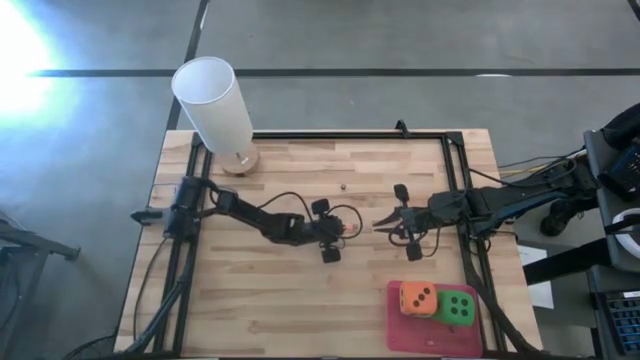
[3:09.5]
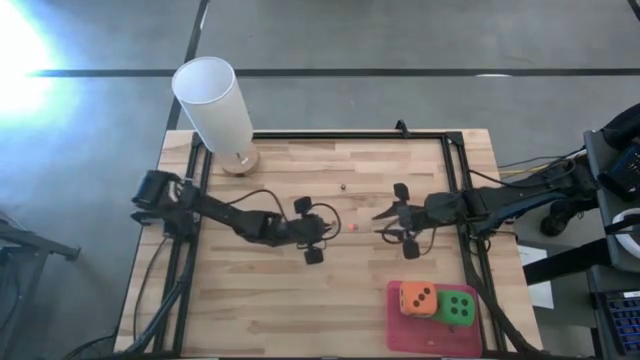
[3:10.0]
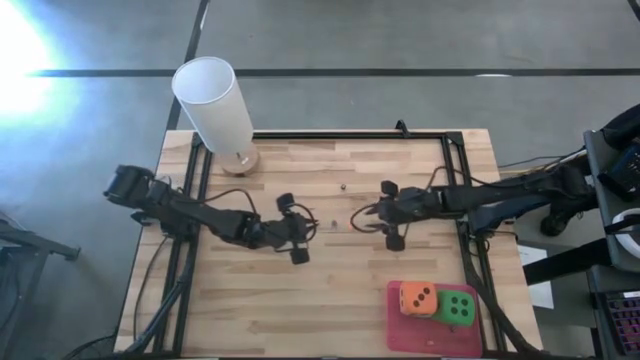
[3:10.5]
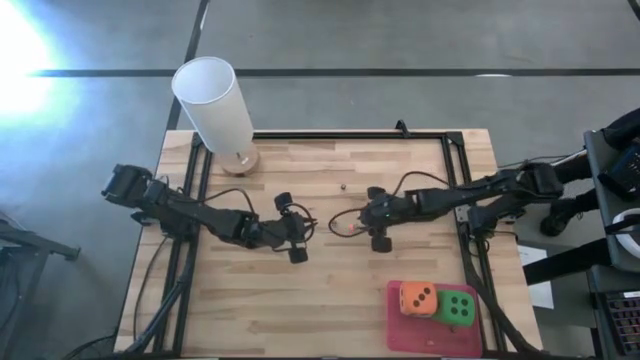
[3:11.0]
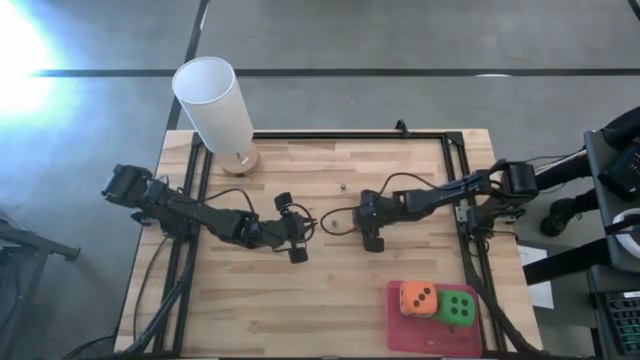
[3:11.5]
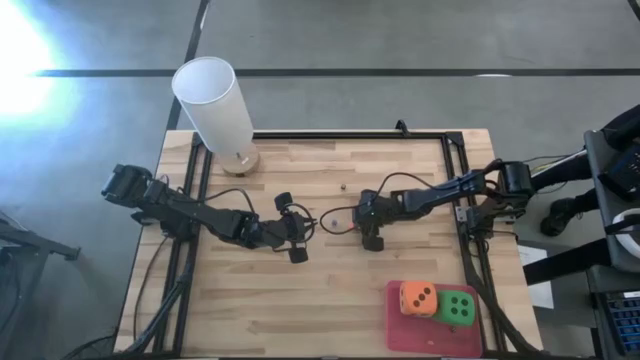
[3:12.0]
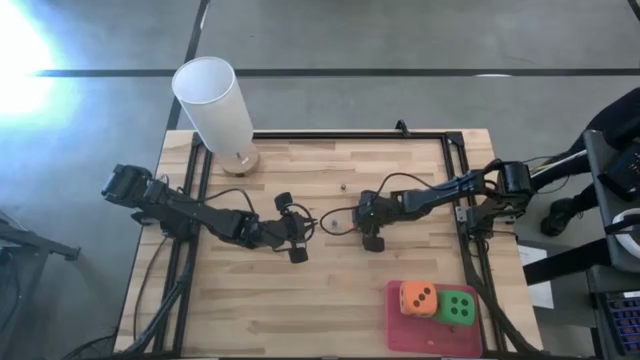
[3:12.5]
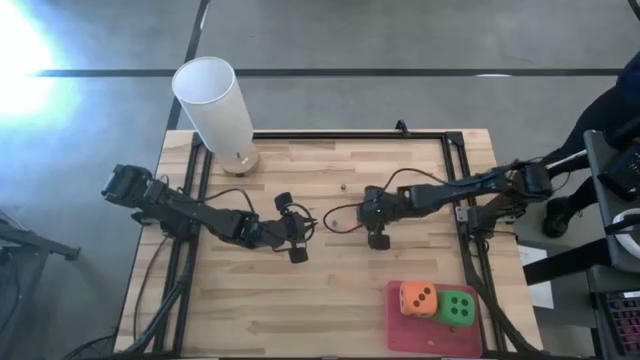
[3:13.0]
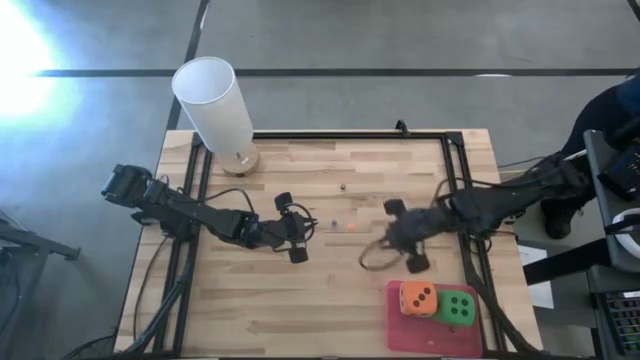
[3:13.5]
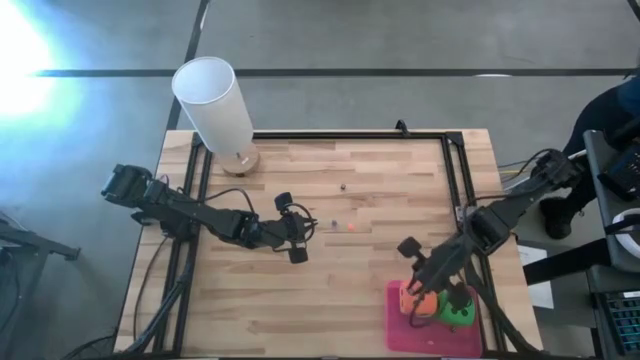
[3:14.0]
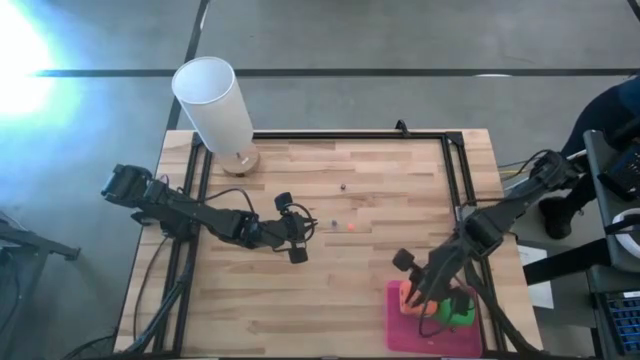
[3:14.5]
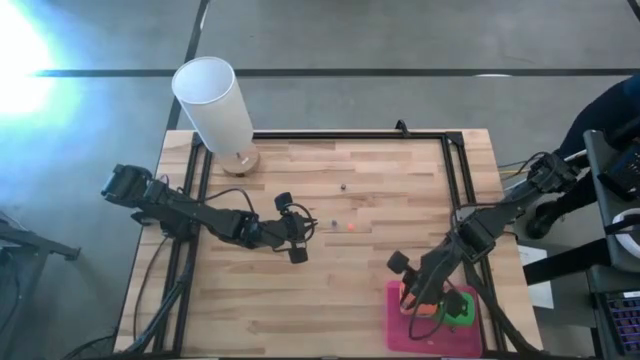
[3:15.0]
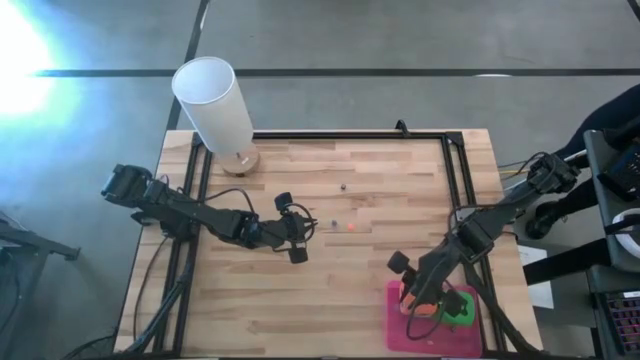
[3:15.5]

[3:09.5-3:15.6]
Task: Pick & Place Dice
Put the small purple die into the bin

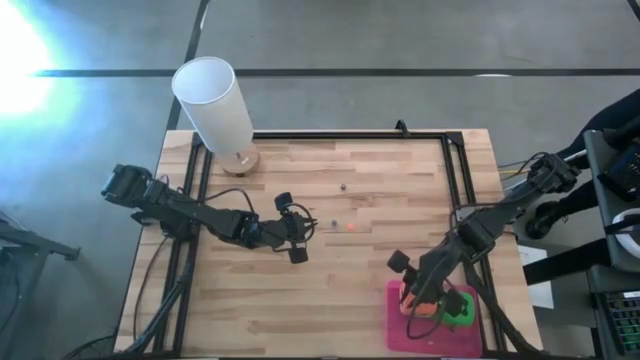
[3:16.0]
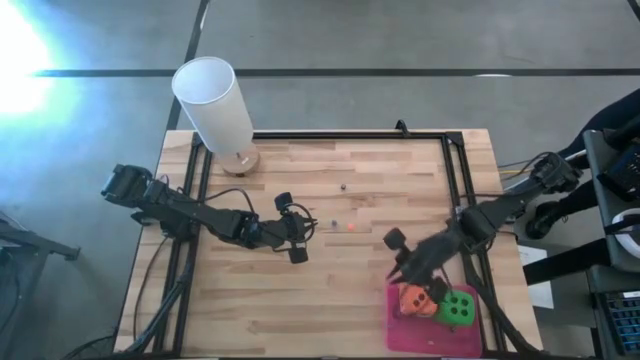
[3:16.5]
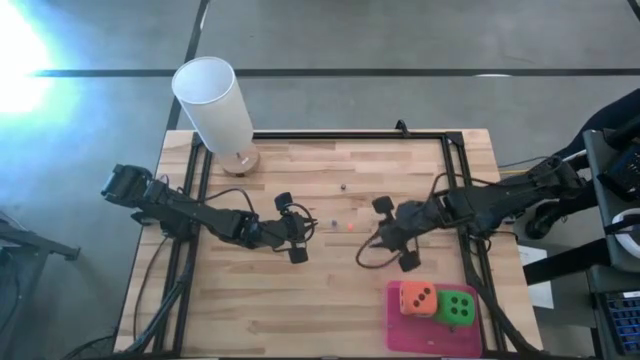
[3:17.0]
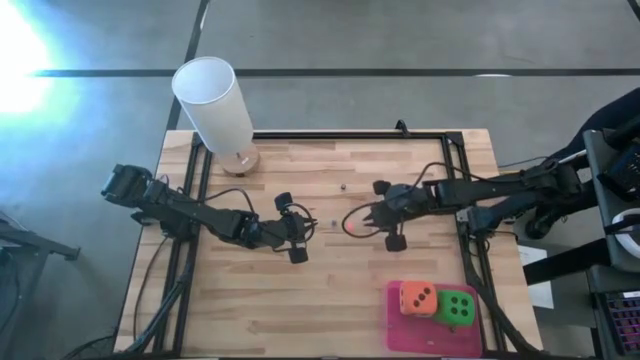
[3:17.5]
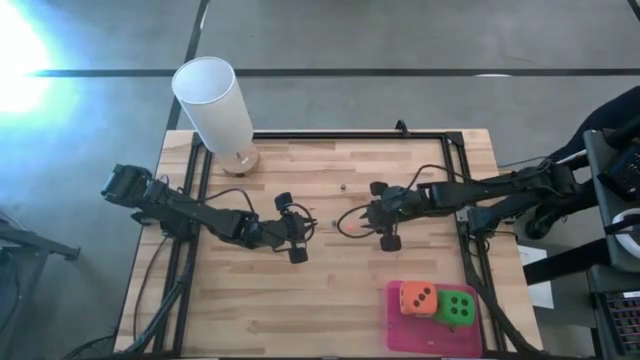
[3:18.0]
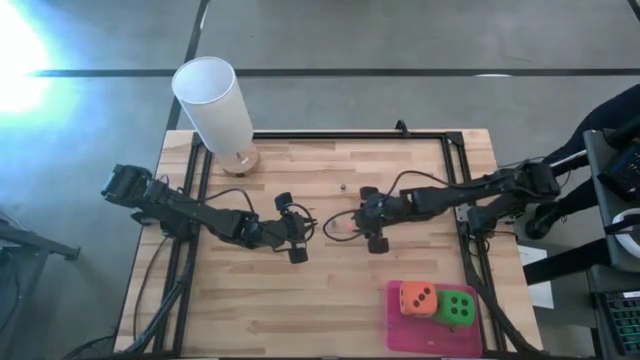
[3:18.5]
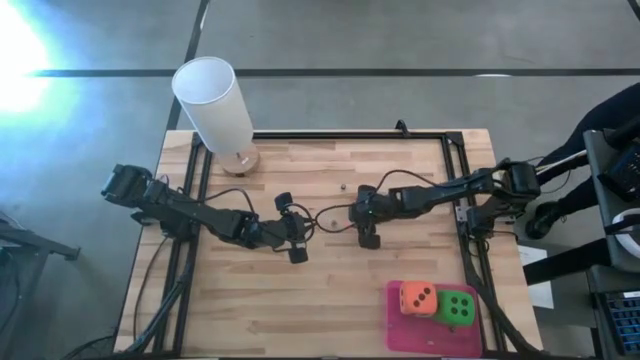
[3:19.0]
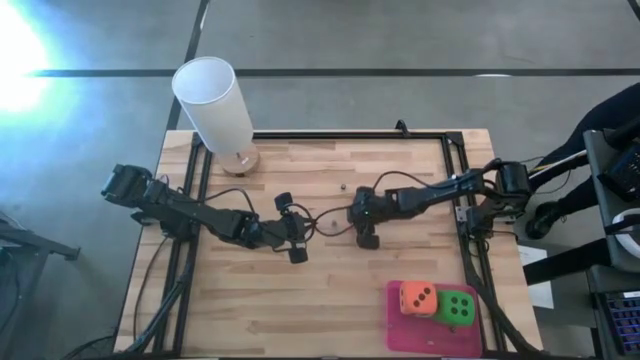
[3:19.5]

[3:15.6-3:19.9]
Put the small blue die into the bin

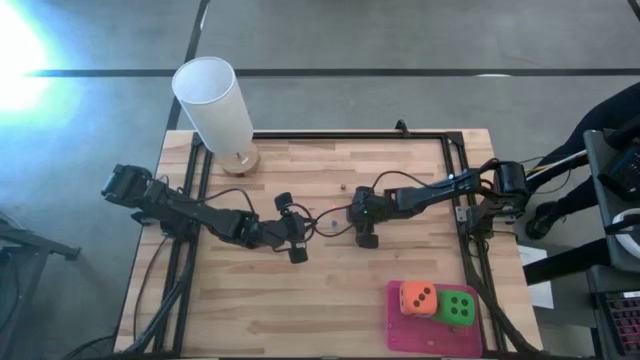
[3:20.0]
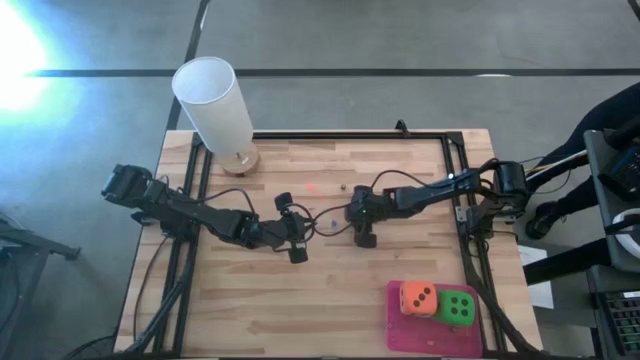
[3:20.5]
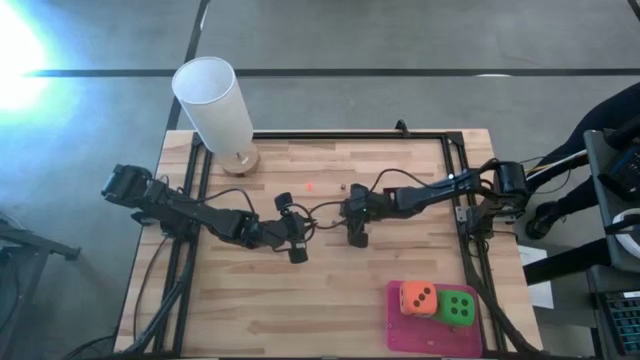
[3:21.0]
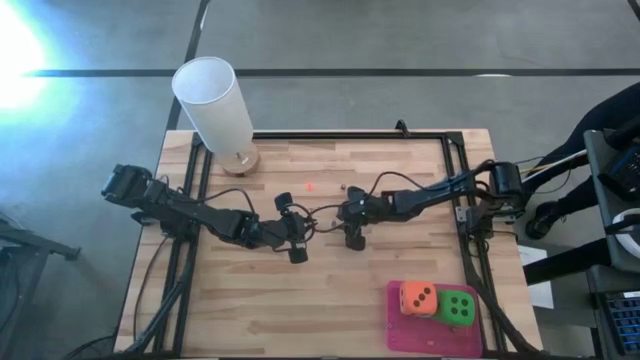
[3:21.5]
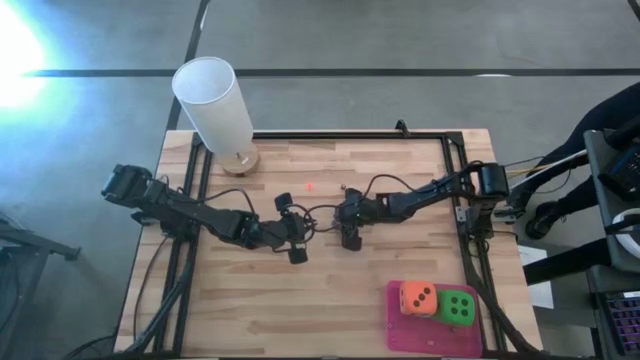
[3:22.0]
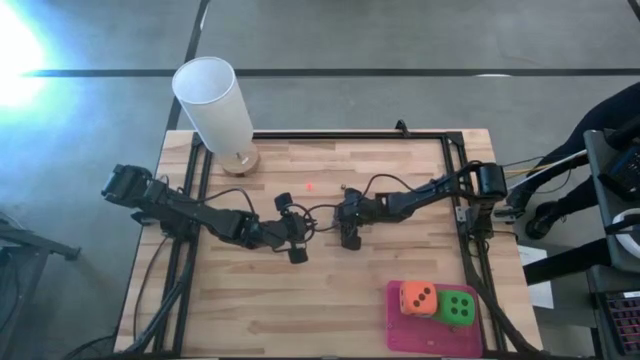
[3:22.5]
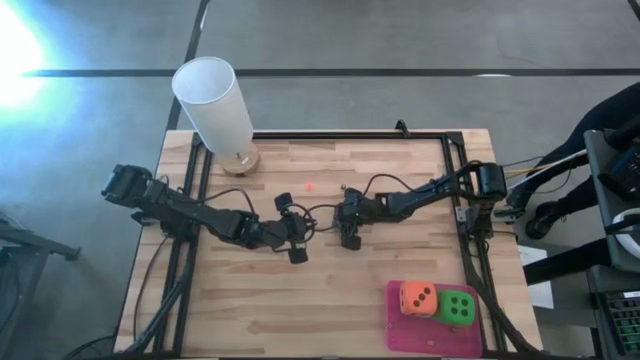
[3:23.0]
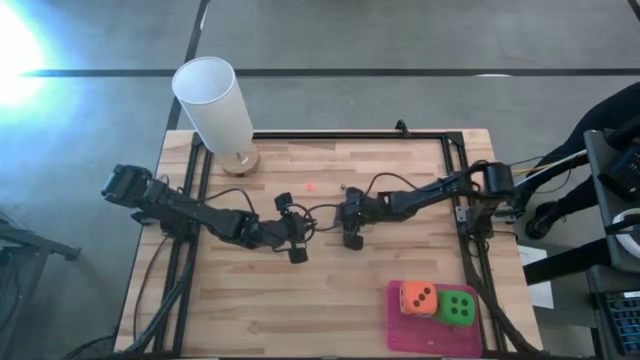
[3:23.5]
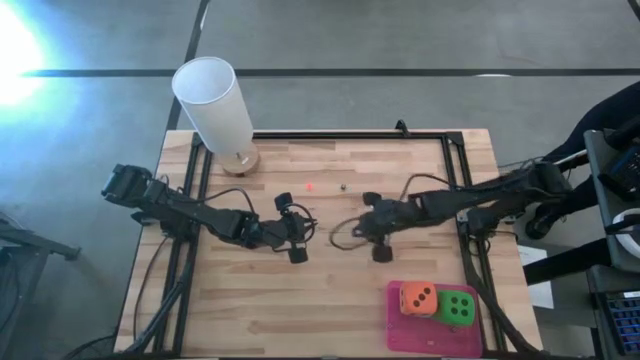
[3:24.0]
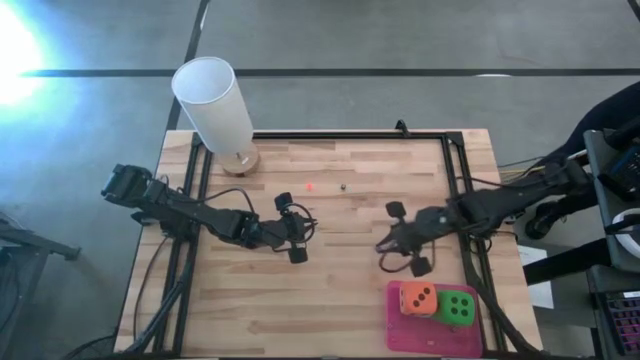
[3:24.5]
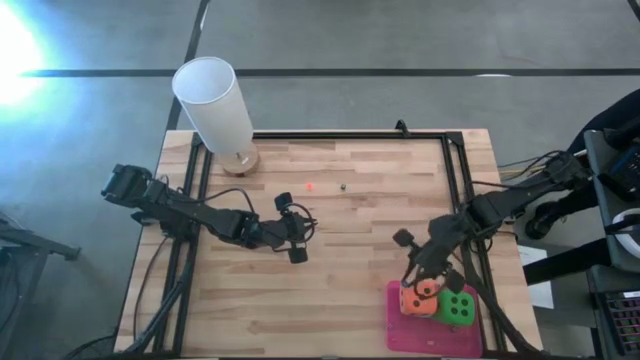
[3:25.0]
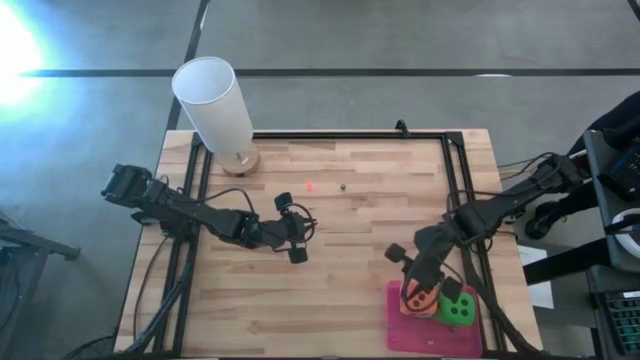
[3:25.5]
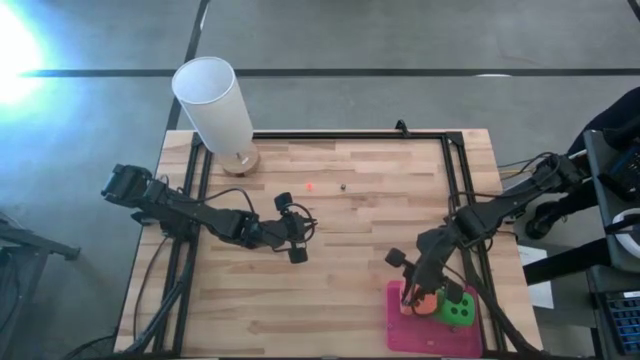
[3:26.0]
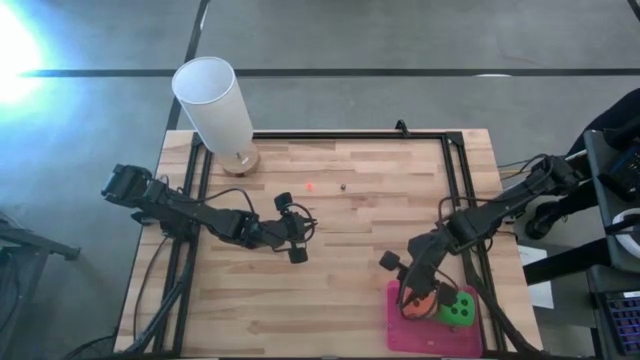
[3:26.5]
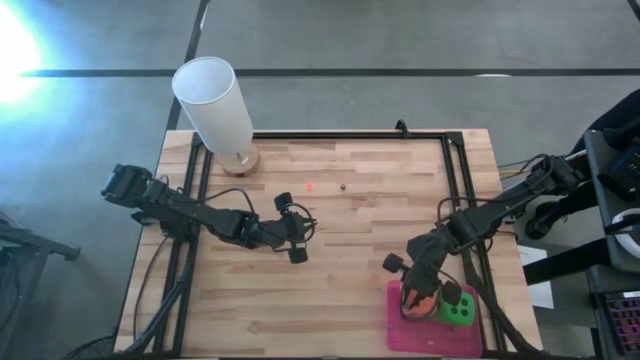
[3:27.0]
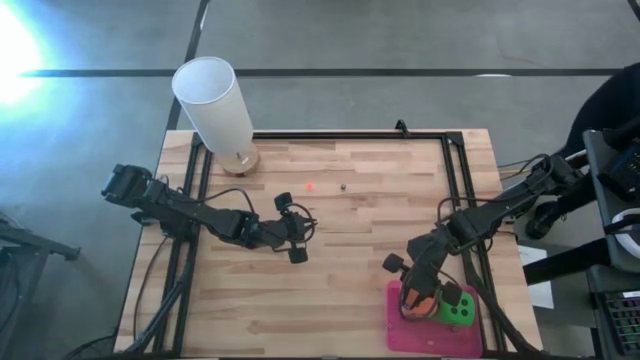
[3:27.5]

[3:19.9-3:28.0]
Put the small blue die into the bin
